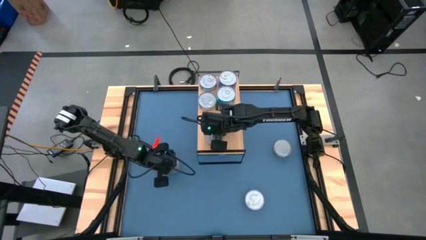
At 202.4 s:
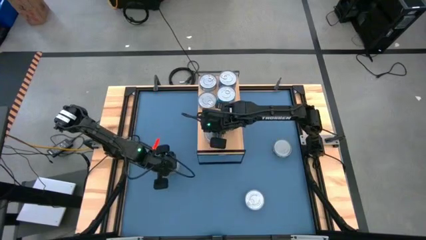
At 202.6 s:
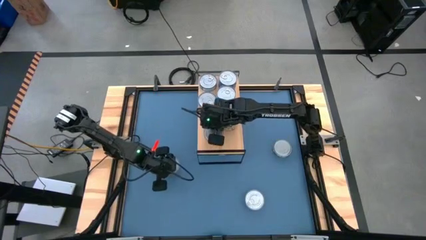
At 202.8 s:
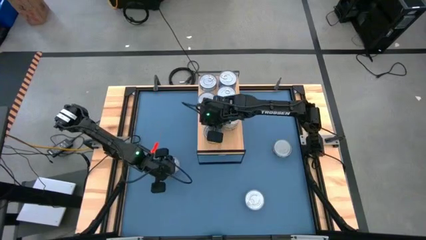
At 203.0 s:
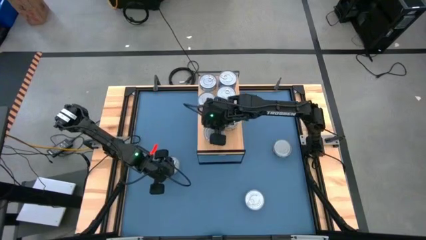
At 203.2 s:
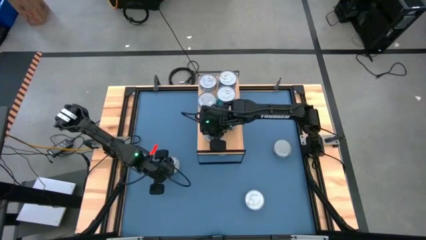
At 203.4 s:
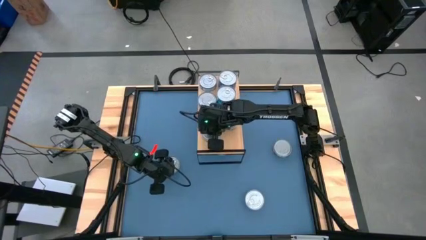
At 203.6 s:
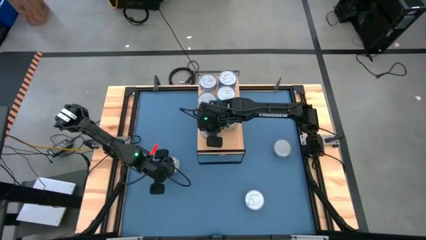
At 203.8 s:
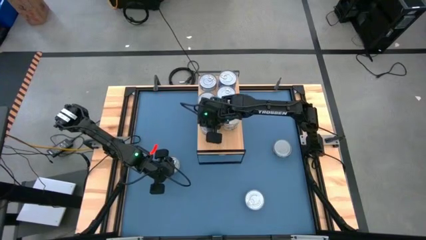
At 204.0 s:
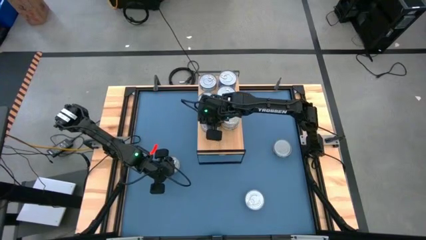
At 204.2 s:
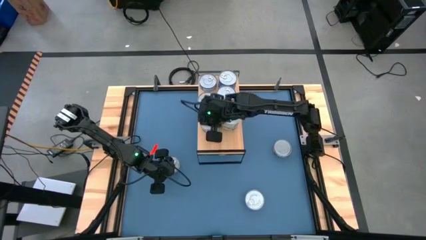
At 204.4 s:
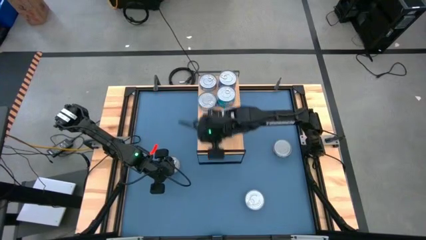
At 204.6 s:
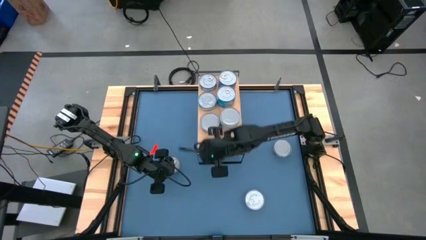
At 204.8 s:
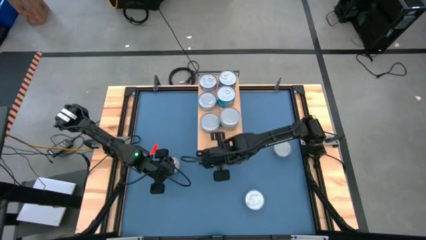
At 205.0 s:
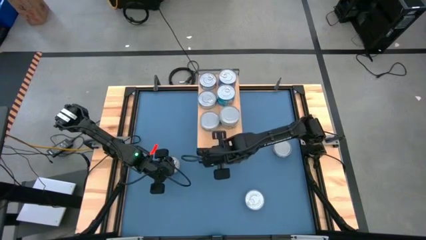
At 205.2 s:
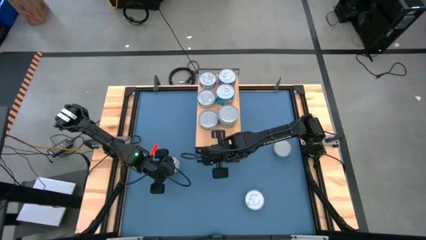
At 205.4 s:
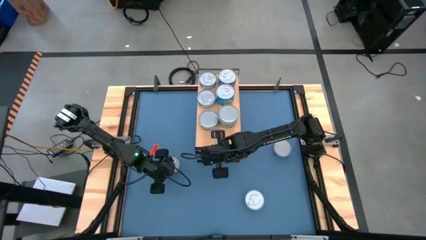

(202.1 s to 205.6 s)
Task: Stack canned seafood by type on shelf
Adjust the green tuna can and the shelf on the table

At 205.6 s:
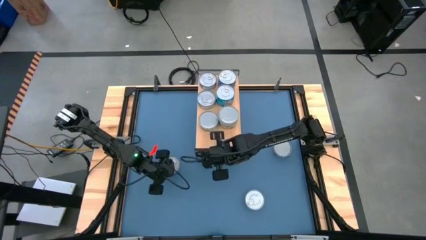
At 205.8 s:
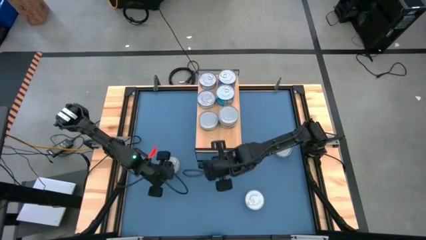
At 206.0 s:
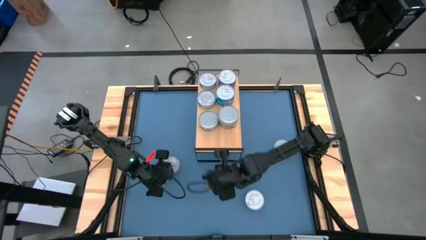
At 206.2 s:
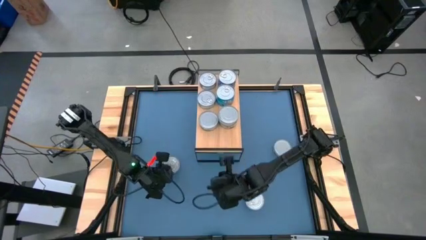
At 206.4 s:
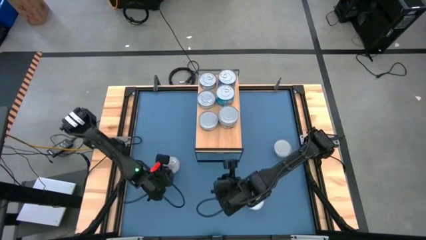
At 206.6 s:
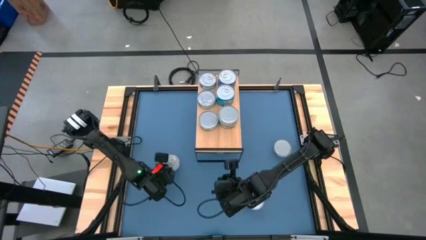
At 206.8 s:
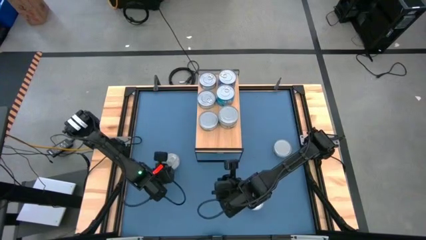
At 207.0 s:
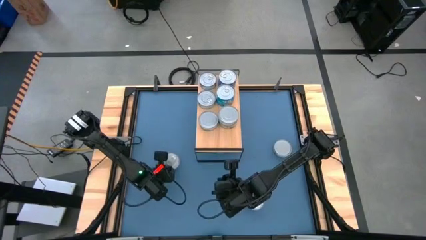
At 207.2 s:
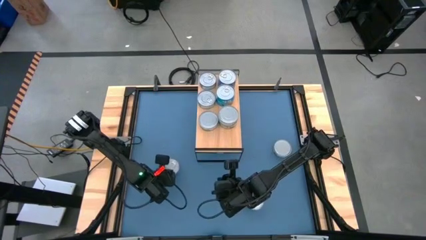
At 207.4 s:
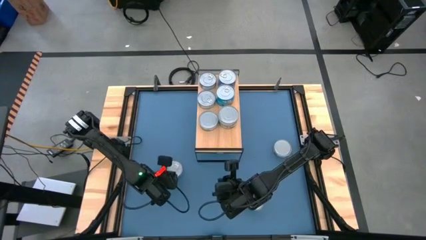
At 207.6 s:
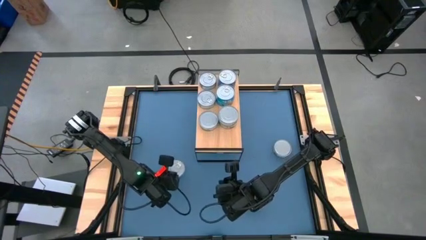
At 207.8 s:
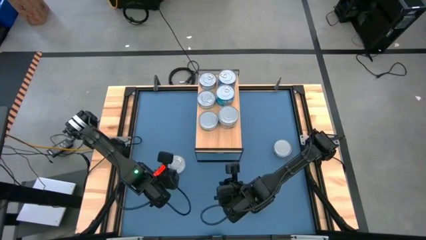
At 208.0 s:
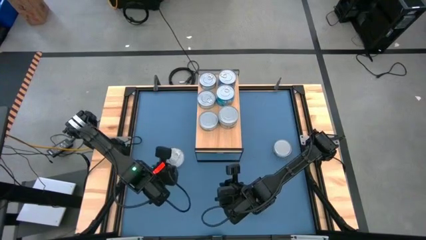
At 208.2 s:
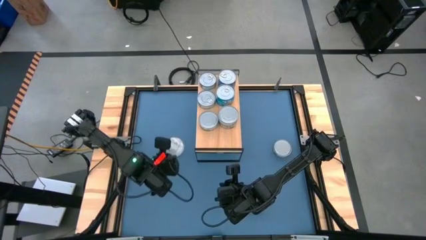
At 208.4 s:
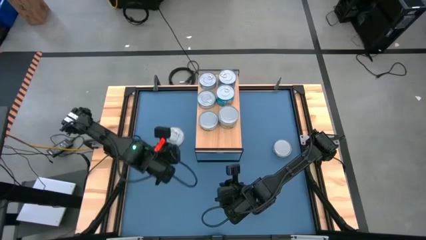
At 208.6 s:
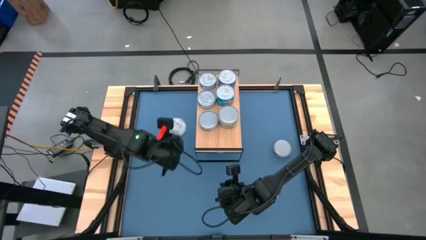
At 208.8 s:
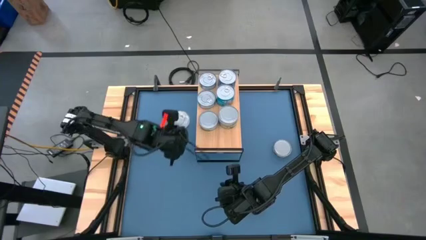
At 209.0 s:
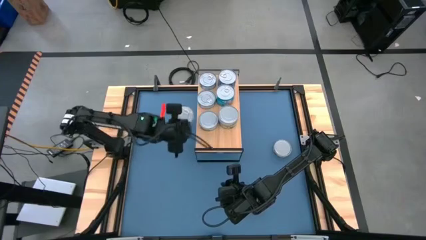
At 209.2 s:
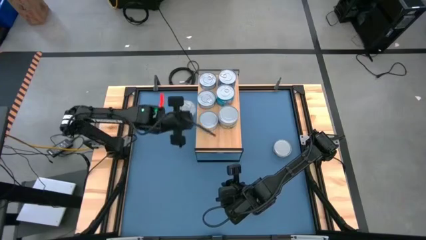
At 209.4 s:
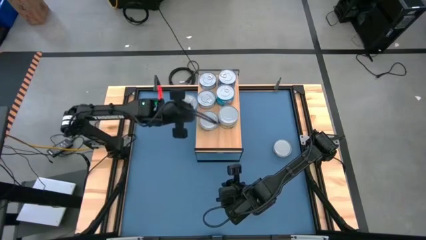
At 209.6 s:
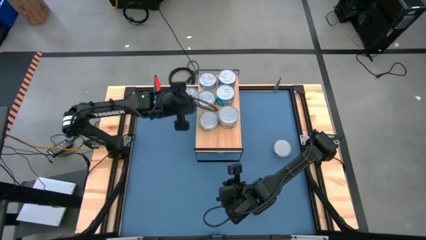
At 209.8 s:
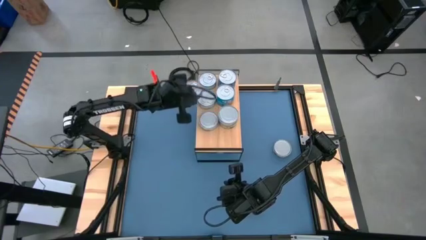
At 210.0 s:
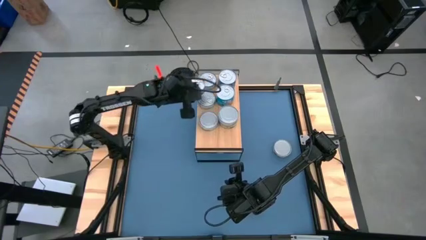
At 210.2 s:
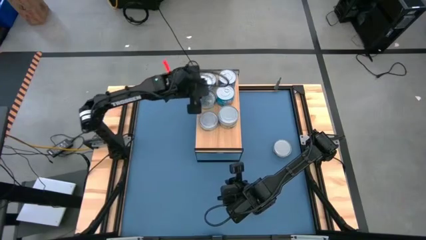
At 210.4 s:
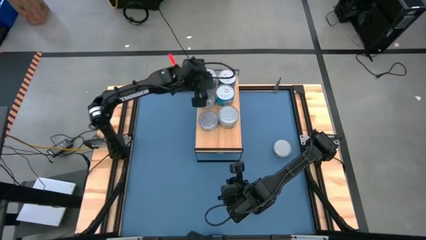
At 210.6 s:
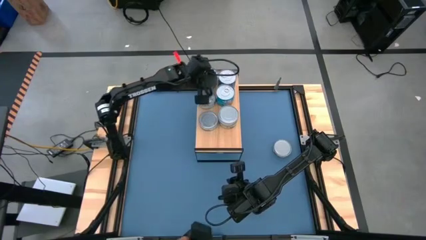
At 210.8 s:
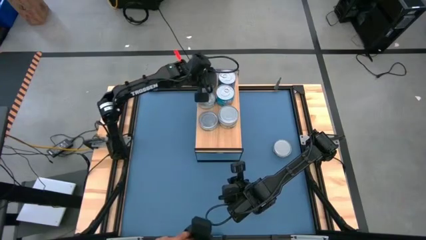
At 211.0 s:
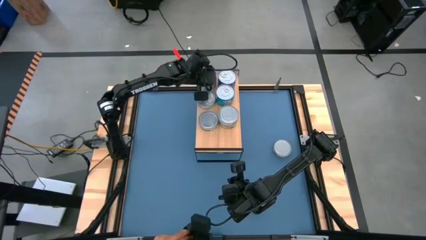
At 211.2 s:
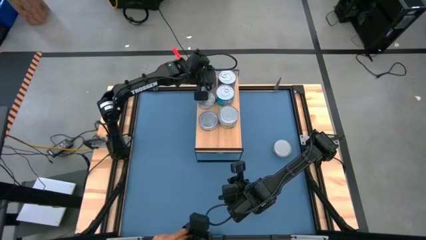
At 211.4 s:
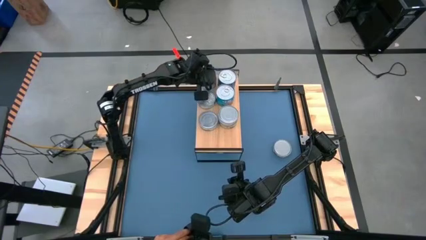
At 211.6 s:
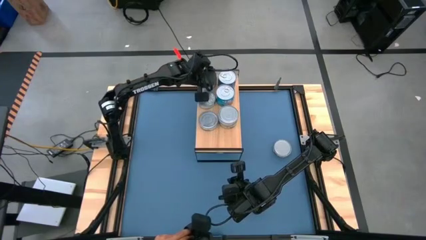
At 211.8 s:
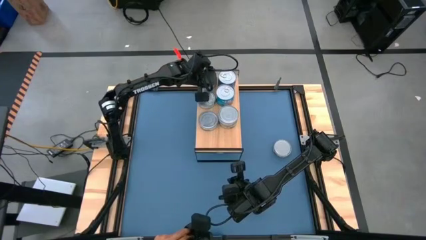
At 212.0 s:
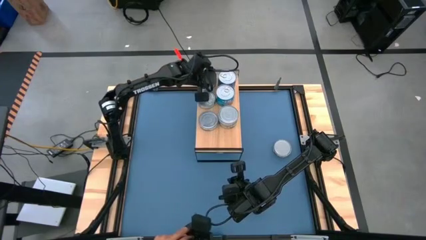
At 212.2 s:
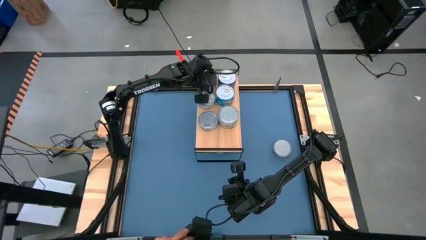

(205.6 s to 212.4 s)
Stack the blue tuna can on top of the other blue tuna can on the shelf

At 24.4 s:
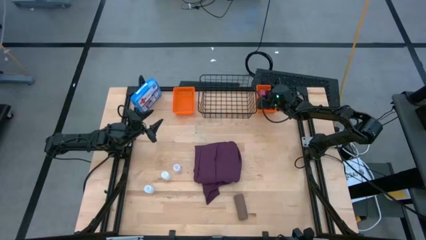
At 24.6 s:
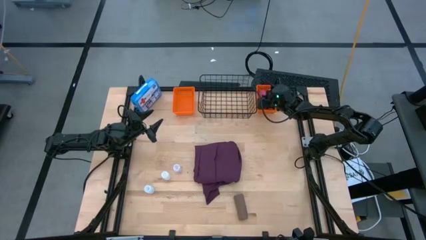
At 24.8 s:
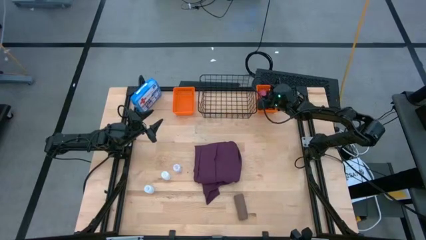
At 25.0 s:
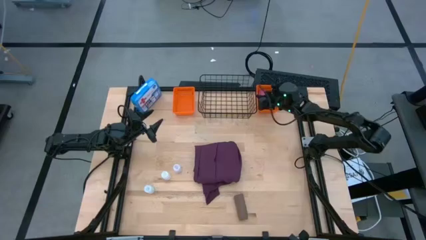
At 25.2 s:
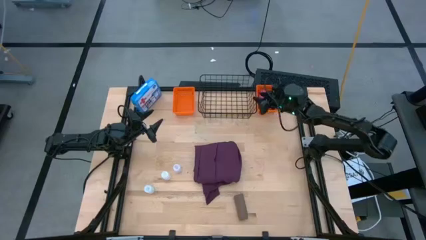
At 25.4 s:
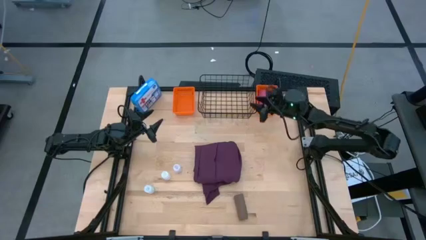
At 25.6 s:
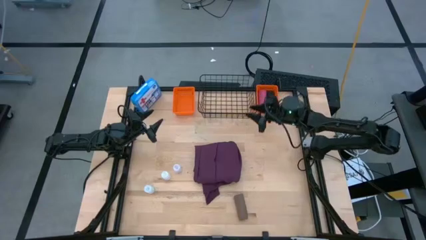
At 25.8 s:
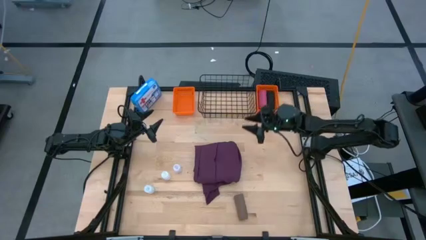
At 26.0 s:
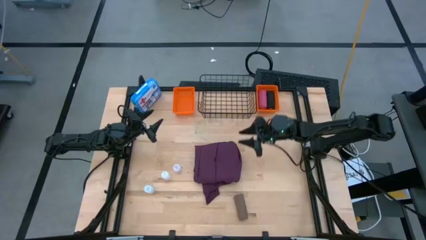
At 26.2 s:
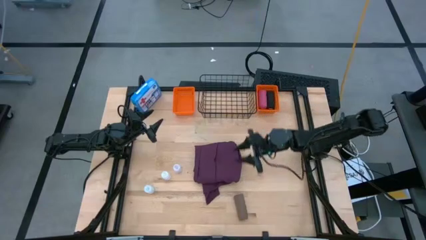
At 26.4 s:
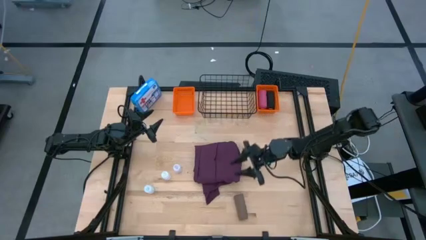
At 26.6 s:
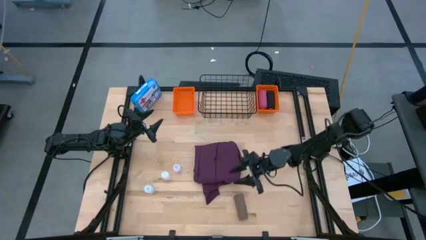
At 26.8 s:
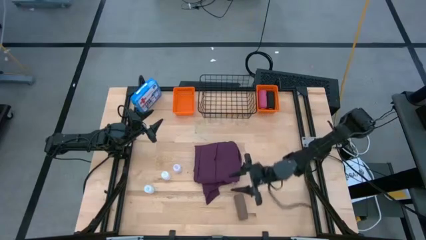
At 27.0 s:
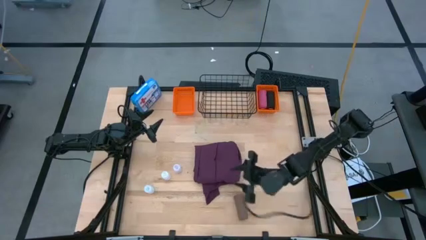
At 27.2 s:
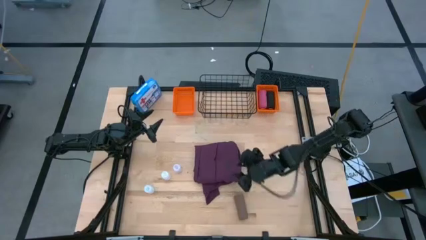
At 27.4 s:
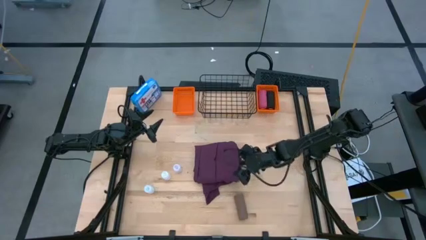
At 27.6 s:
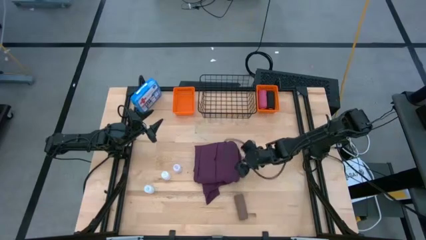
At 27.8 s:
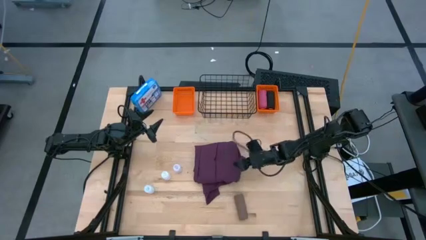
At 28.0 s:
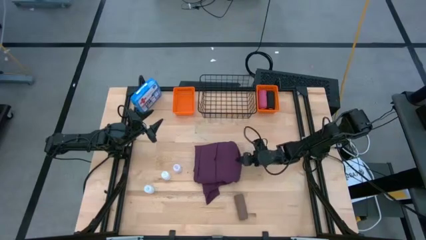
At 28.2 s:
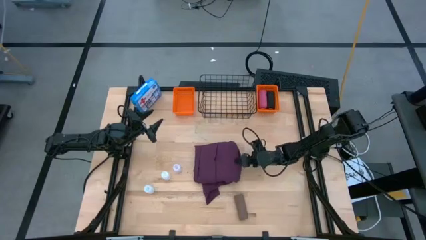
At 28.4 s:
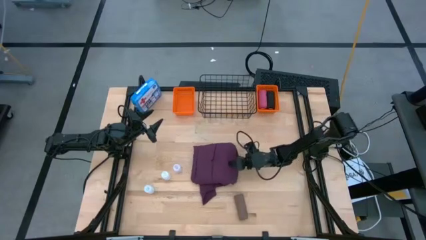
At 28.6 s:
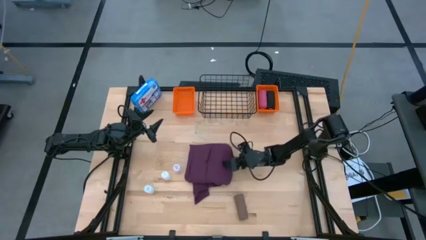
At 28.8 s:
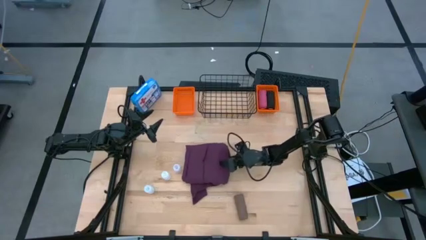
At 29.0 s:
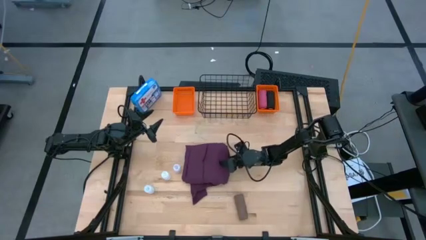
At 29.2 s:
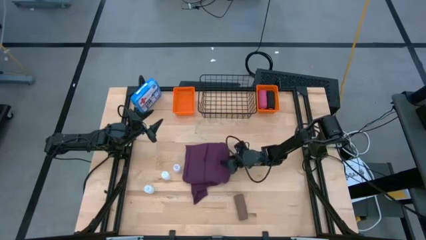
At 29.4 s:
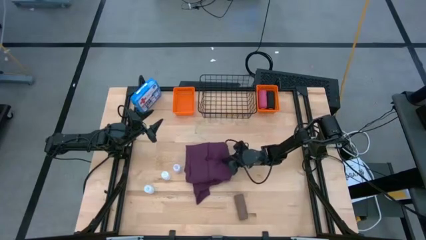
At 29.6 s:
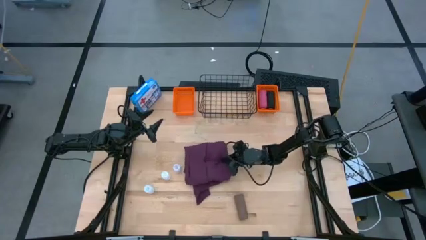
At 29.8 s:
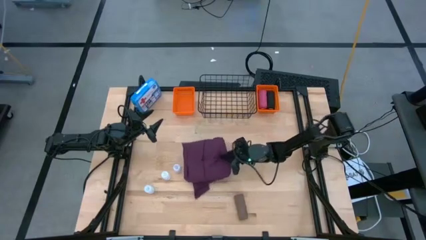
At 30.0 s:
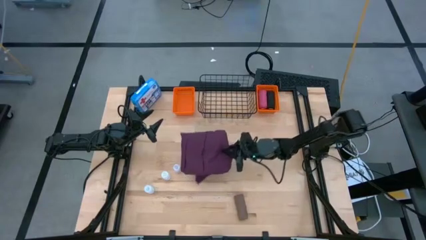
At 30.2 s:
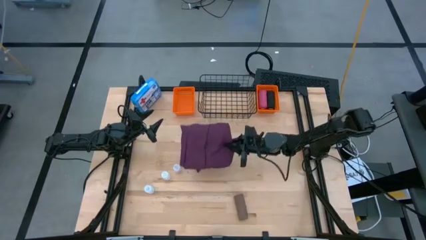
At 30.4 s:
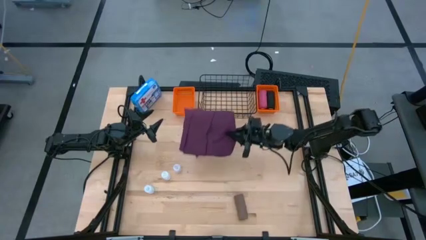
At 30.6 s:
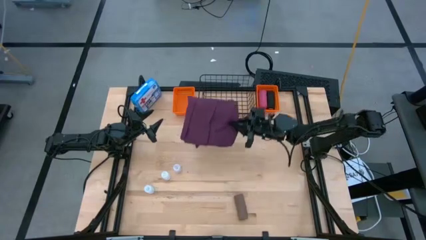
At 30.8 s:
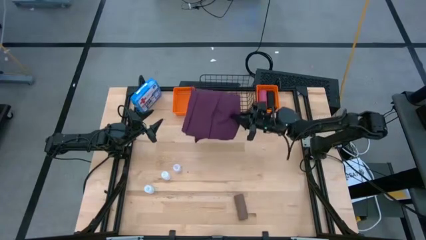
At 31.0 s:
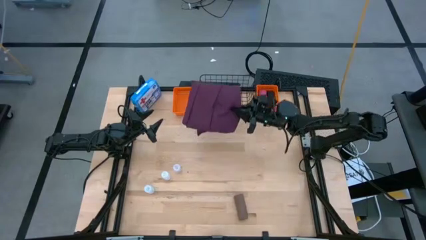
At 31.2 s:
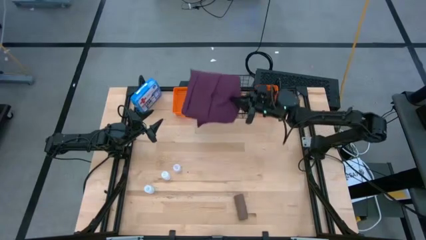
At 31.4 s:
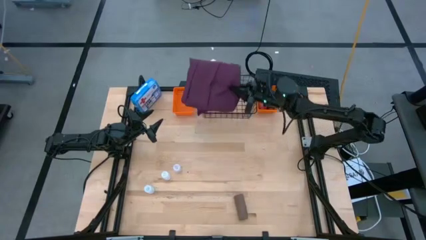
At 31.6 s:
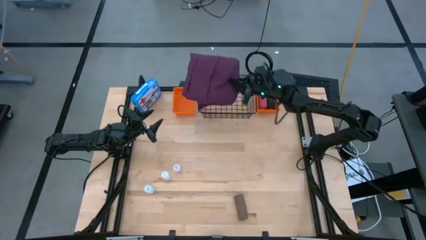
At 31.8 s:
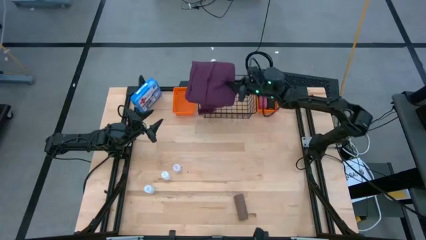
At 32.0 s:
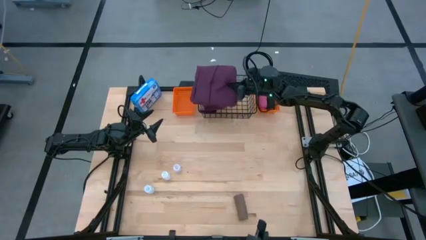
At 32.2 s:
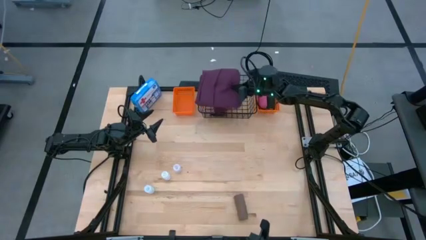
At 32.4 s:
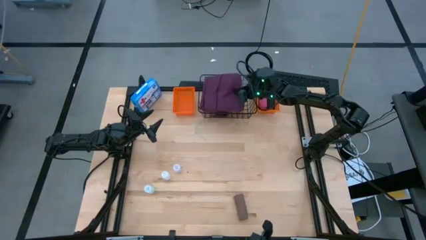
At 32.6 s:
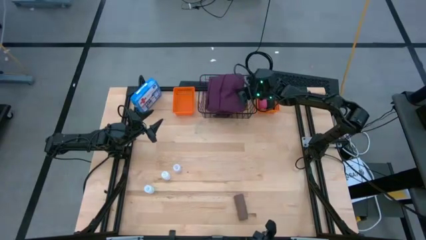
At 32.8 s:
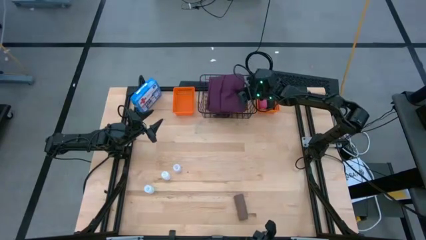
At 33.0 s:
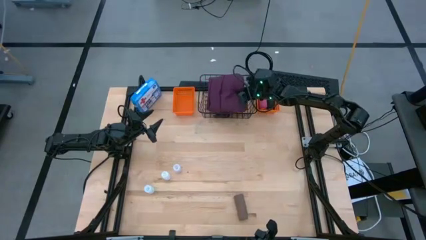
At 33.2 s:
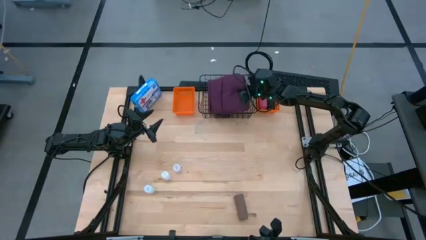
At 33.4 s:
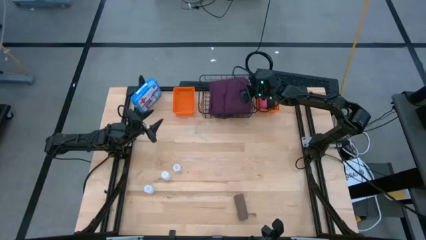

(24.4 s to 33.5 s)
Task: Pick & place medical supplies in basket/bin
Put the violet patient gown into the wired basket
